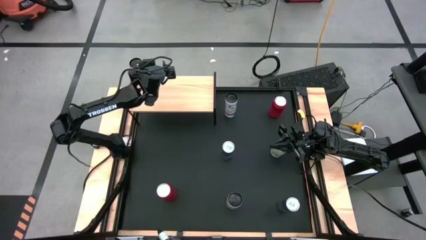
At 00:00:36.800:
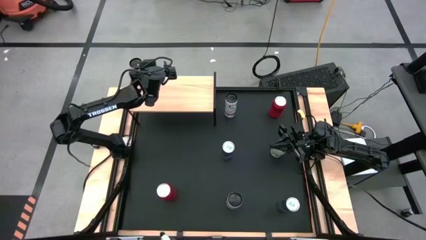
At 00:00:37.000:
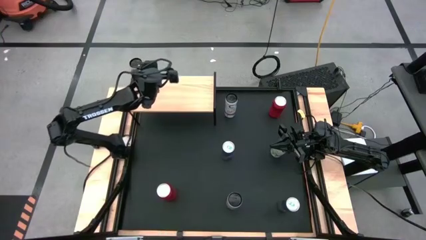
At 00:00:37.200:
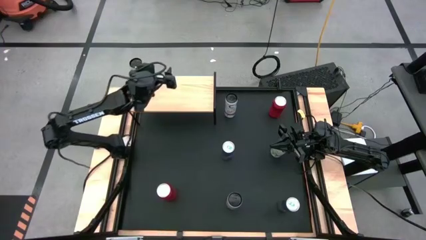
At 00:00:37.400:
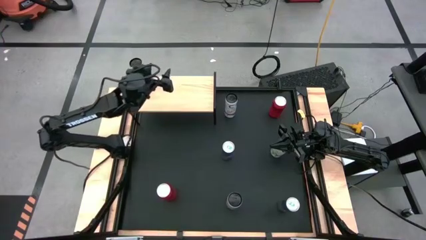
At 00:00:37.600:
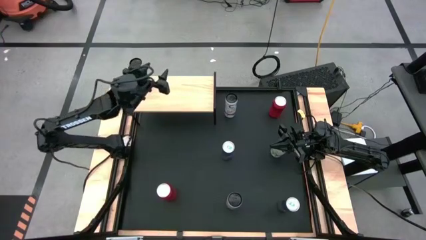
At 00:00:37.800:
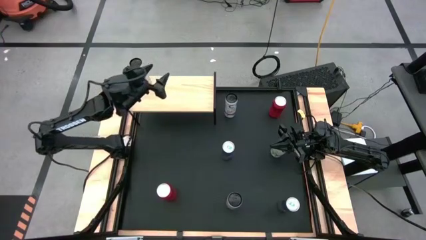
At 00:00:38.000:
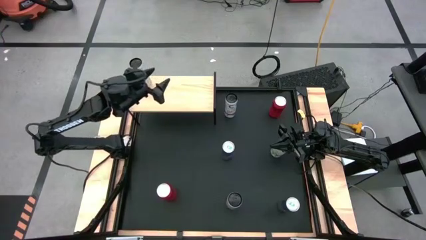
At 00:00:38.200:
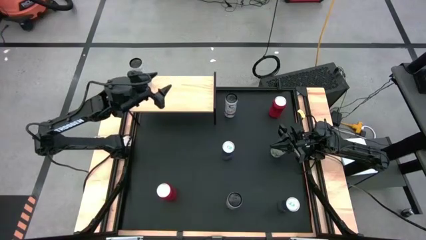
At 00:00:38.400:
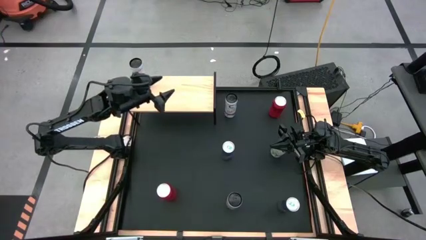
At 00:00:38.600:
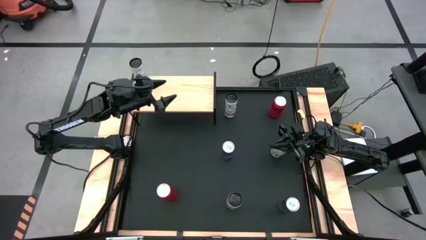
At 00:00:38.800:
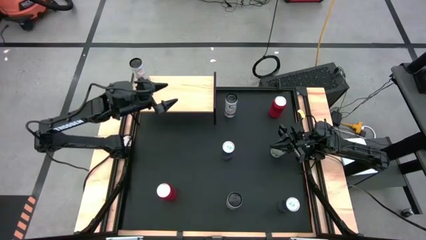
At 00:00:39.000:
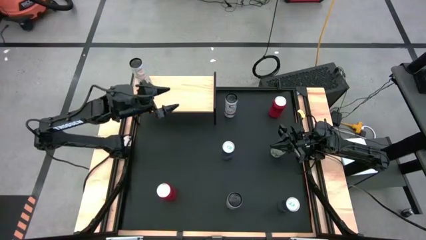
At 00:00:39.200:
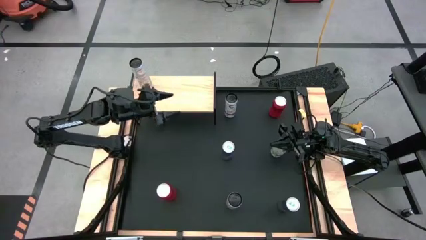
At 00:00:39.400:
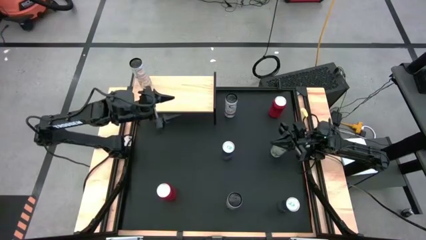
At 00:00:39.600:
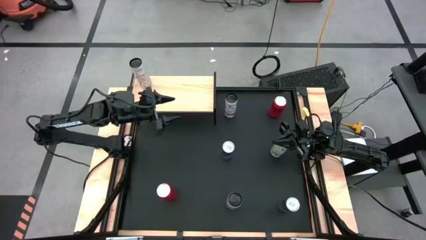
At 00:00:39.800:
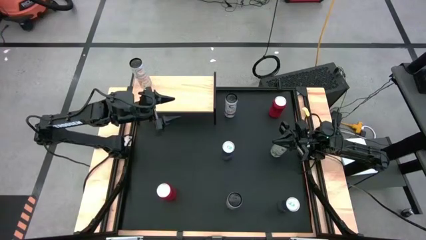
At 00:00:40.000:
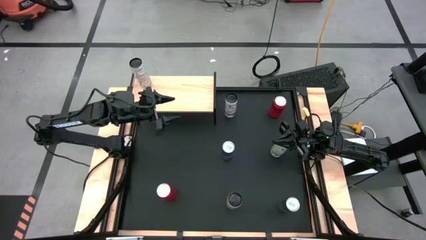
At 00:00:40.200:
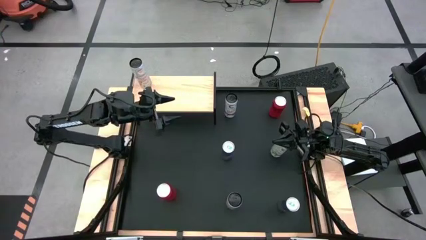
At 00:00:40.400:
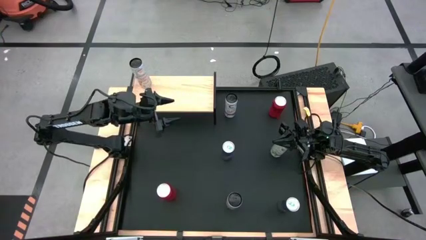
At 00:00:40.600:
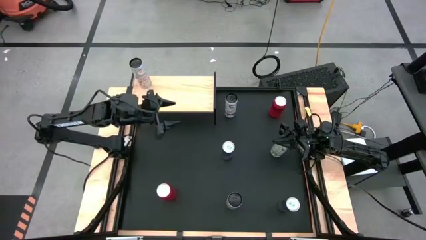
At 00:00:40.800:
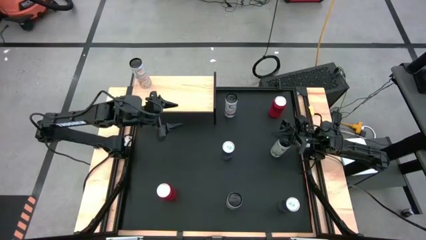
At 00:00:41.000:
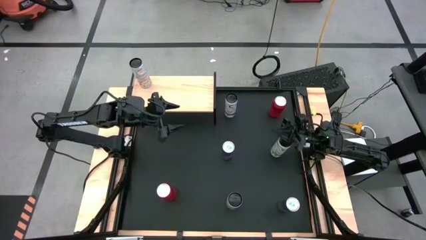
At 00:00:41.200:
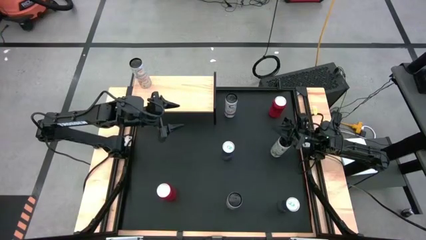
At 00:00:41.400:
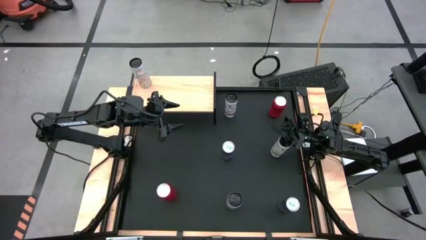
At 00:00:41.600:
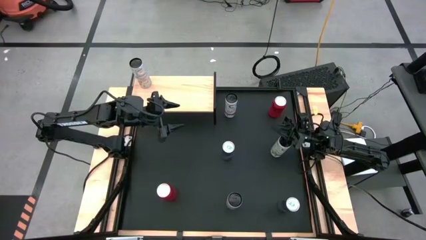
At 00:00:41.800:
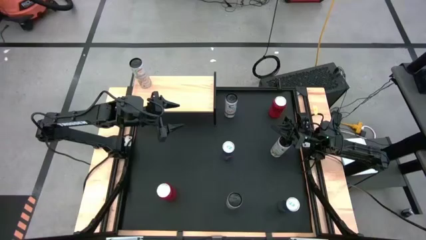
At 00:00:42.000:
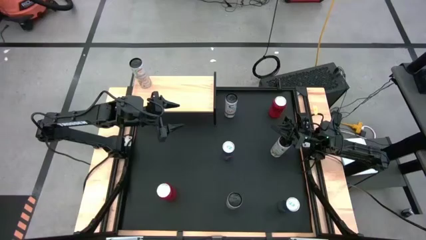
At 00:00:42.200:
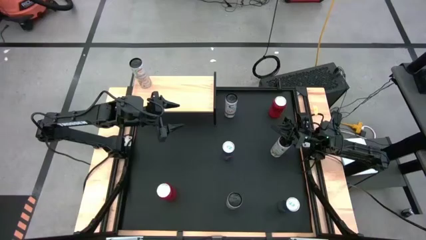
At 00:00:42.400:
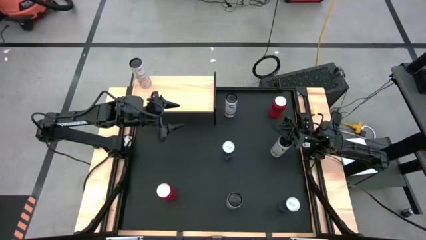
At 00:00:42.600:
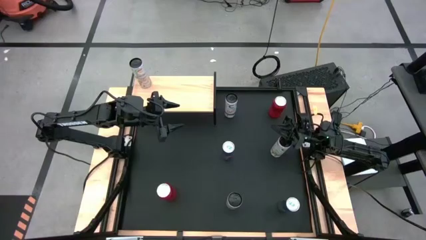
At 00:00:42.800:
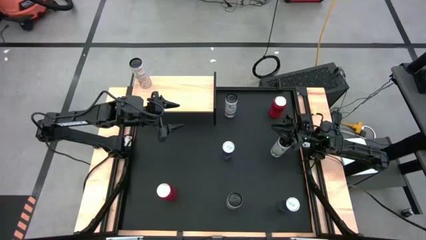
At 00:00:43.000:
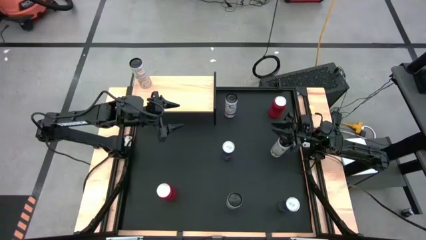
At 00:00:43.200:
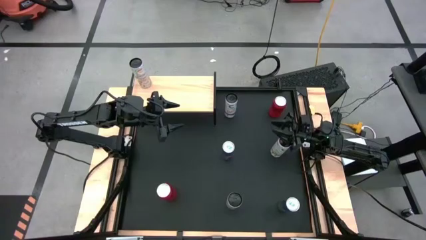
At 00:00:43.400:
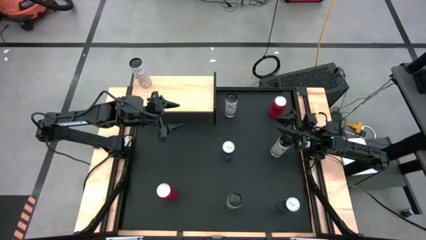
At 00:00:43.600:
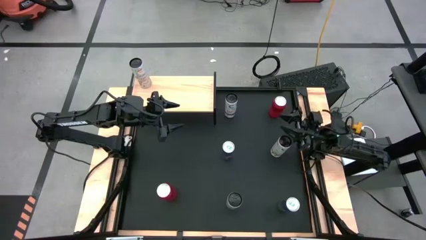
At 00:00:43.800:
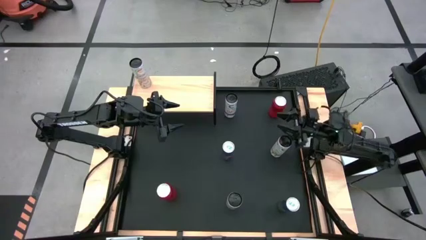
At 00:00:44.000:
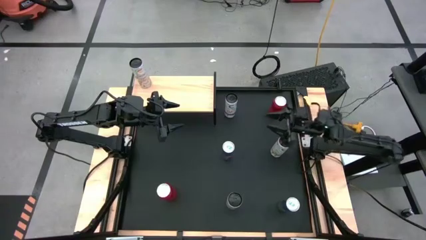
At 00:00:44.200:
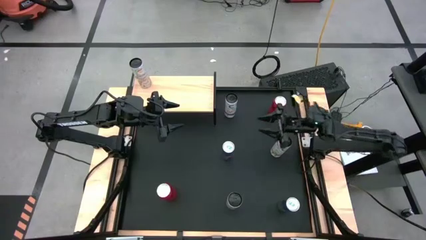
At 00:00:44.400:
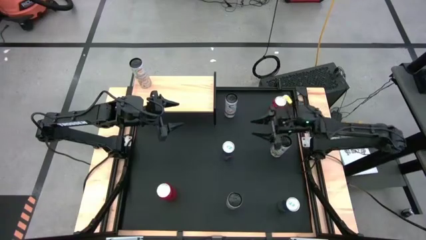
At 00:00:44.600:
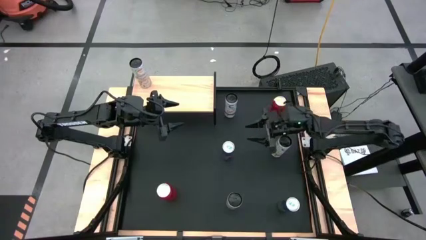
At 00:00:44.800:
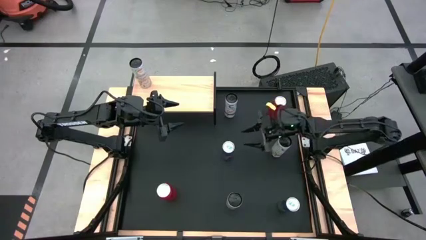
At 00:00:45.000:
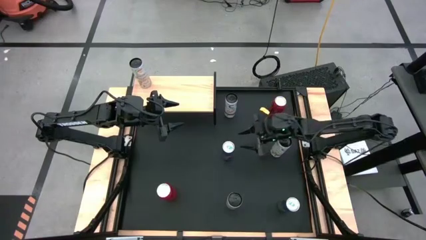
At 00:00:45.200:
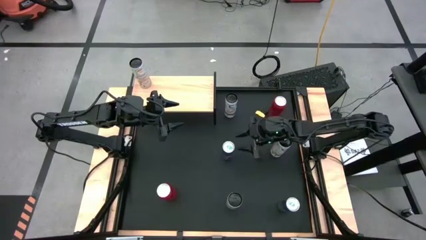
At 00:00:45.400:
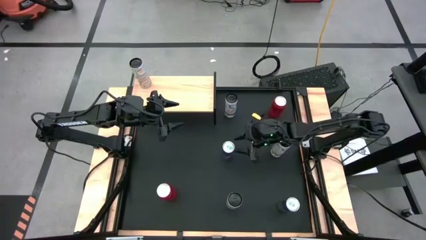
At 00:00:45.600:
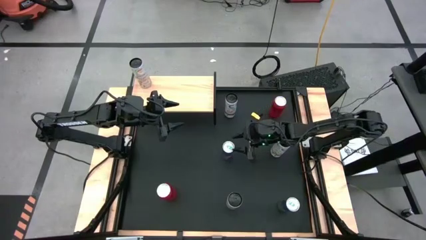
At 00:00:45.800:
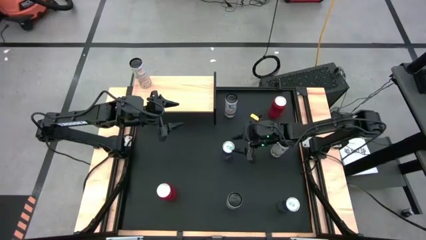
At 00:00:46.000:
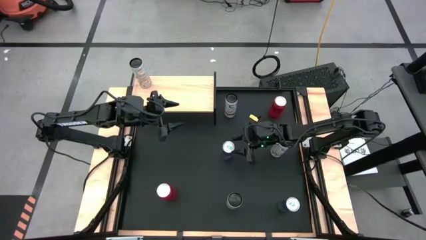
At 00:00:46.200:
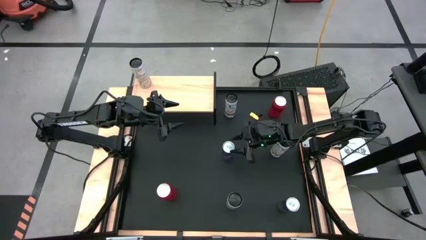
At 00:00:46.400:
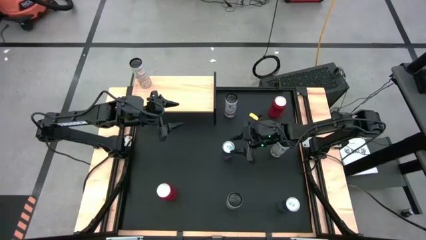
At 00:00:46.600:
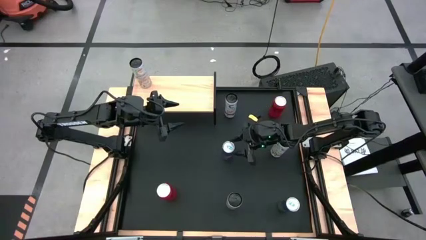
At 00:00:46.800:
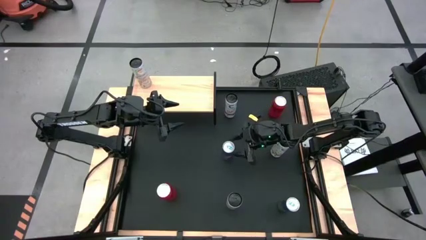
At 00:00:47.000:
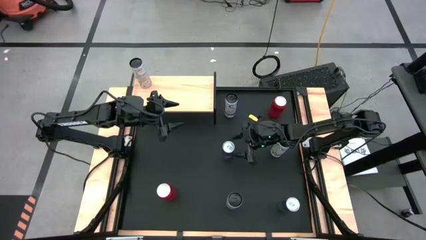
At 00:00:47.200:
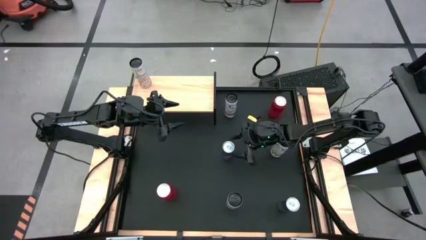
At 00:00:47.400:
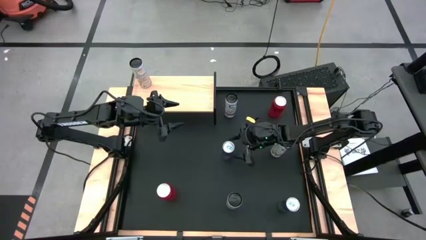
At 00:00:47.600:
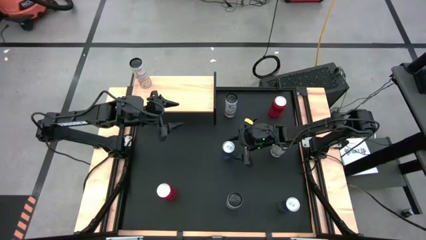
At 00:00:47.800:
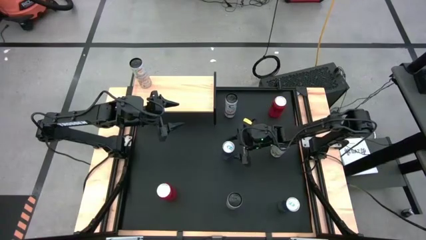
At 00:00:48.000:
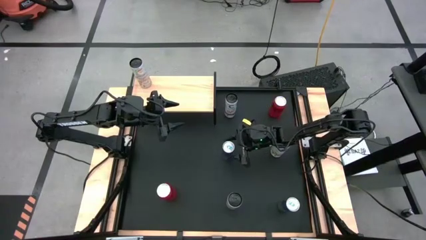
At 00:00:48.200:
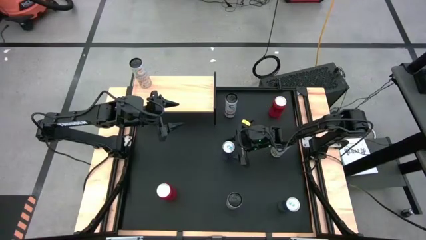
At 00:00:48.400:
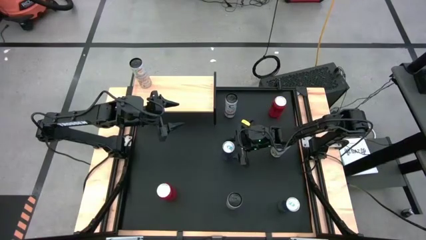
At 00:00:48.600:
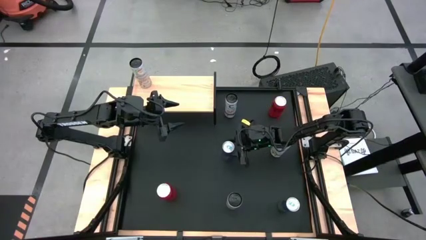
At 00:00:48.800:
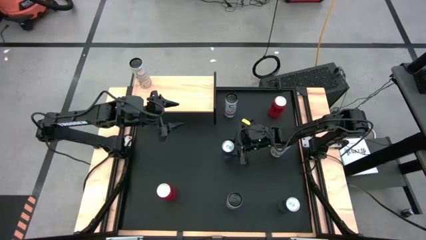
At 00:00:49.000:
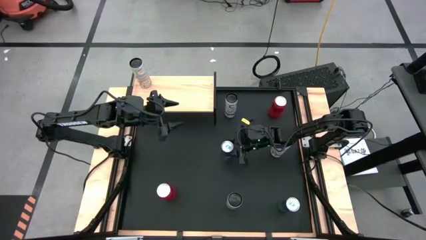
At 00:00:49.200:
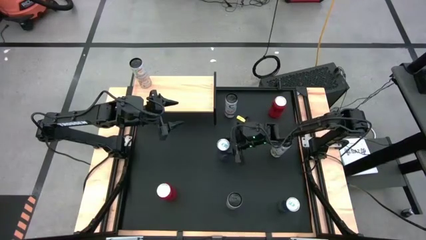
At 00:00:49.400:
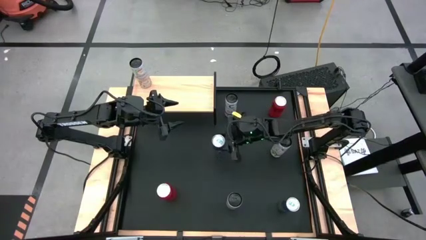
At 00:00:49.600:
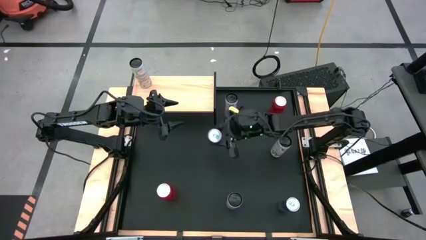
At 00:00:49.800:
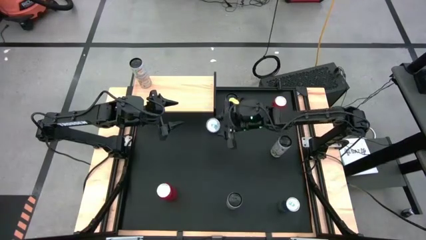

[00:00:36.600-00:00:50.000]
Task: Place canned beverage on shelf
Put the top blue soda can on the shelf
